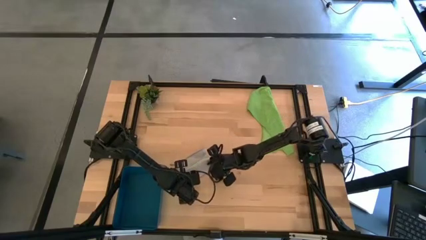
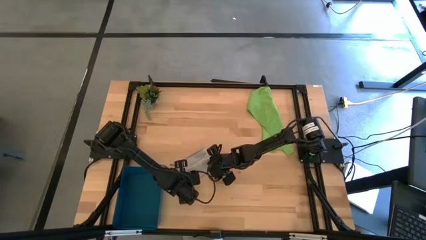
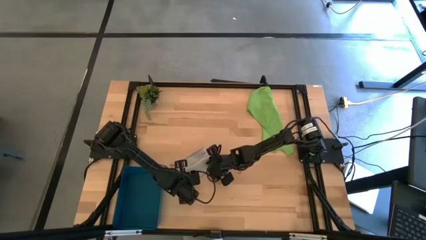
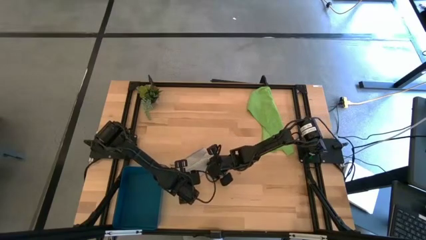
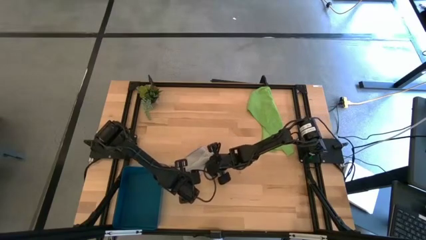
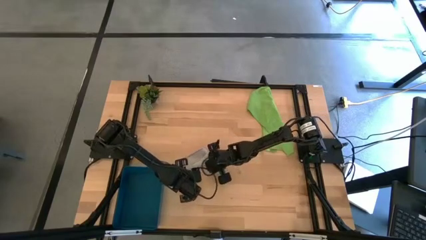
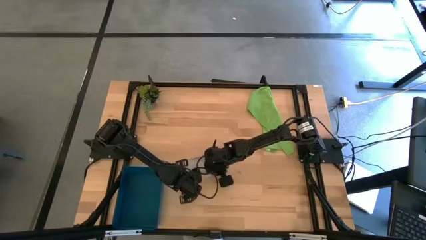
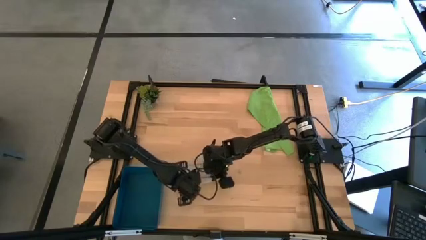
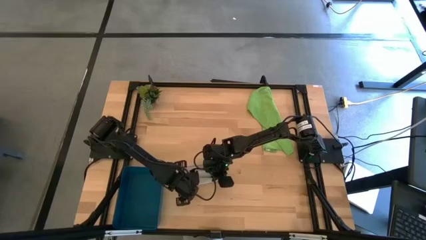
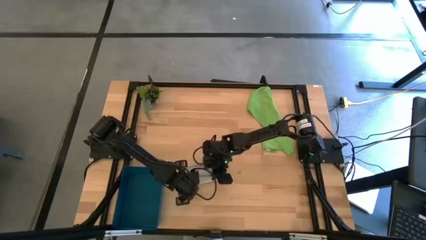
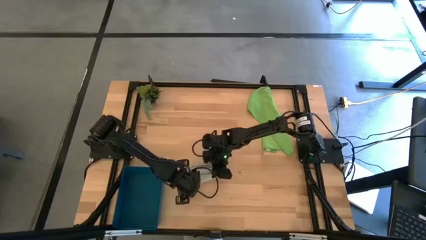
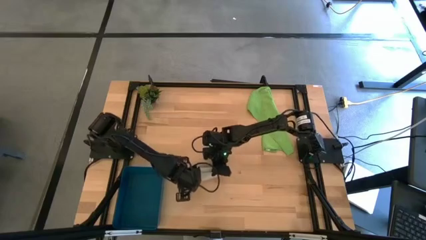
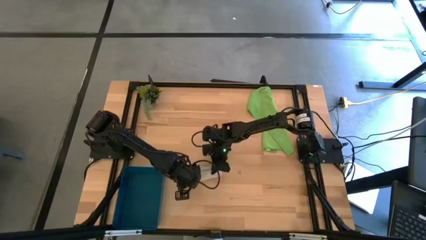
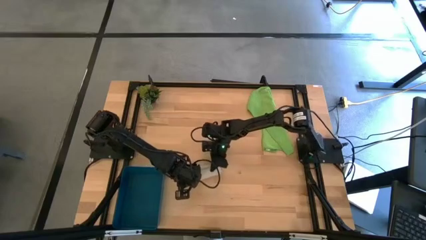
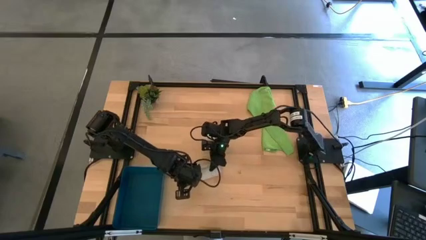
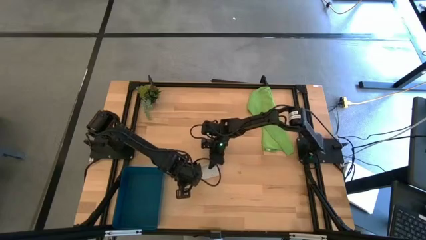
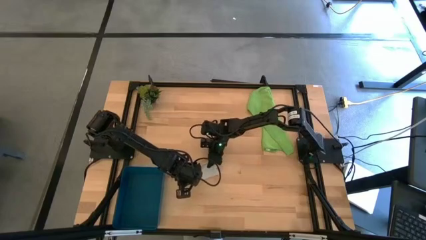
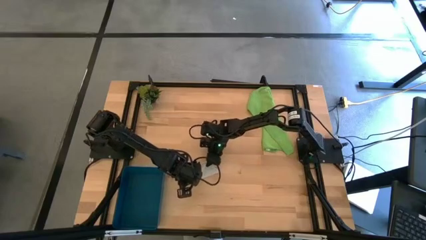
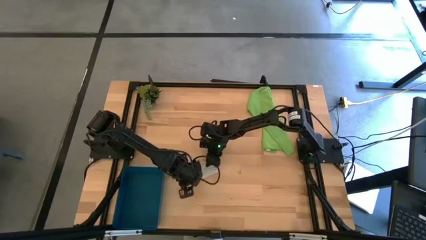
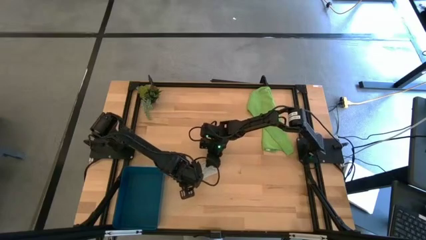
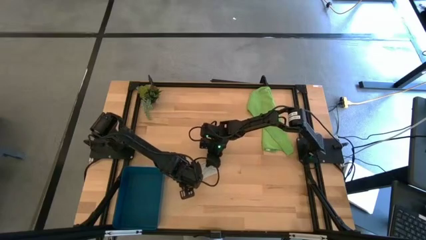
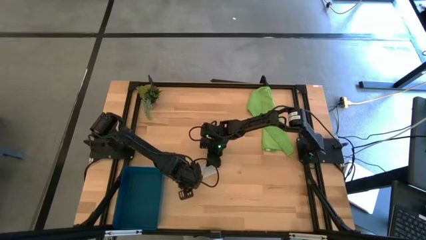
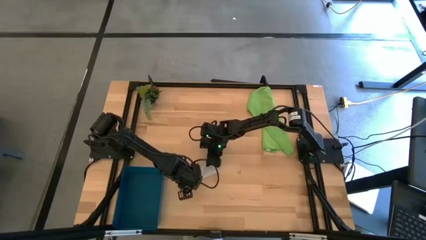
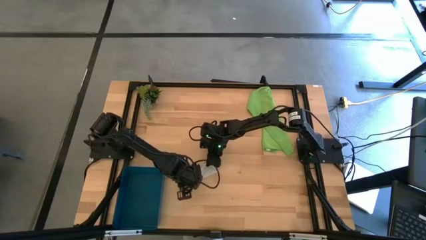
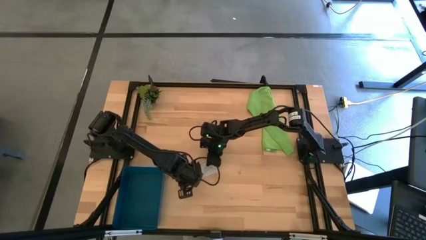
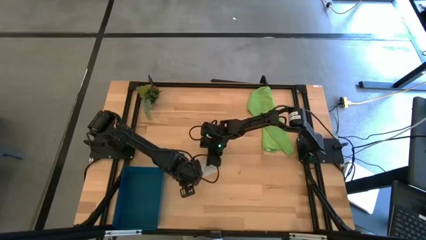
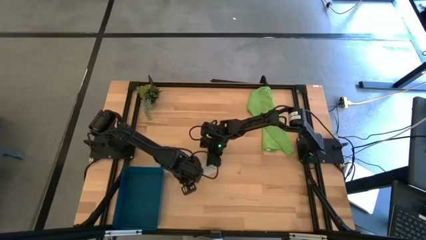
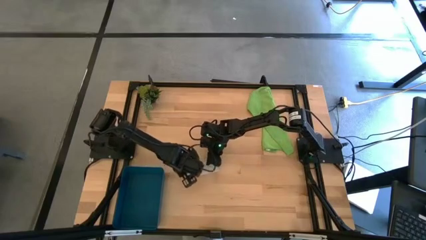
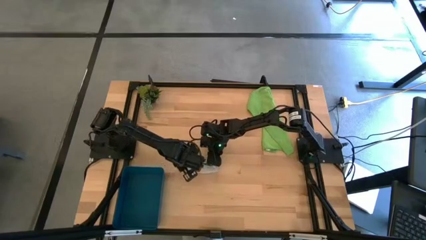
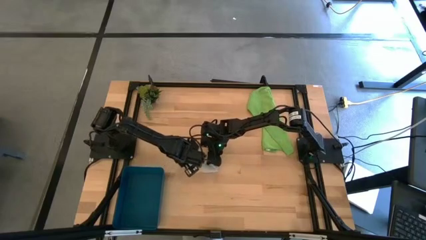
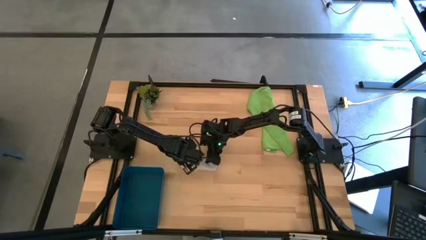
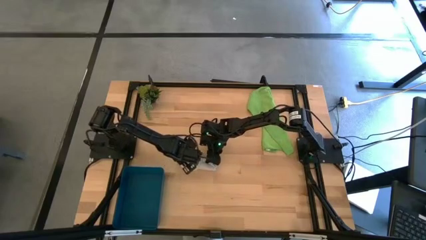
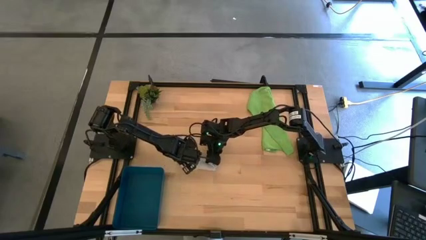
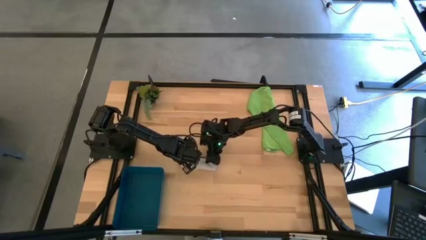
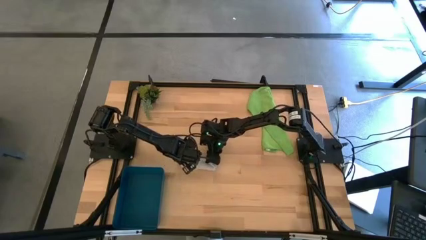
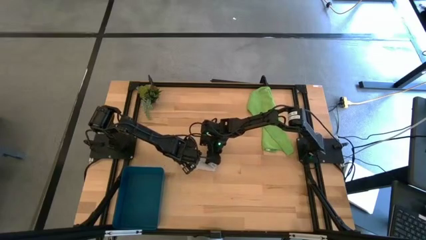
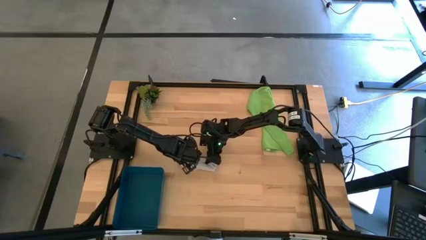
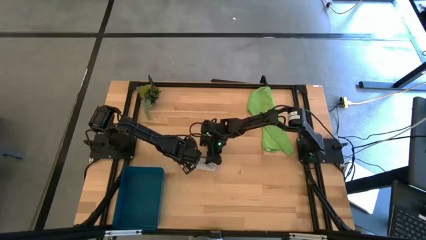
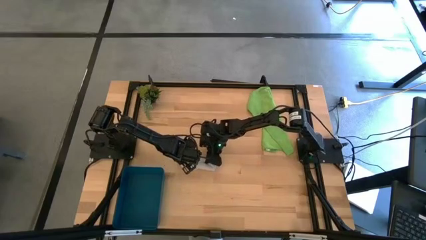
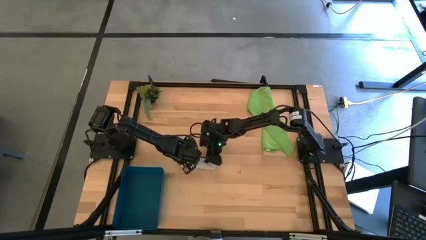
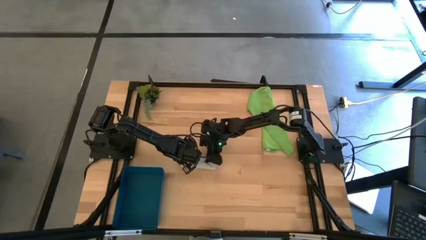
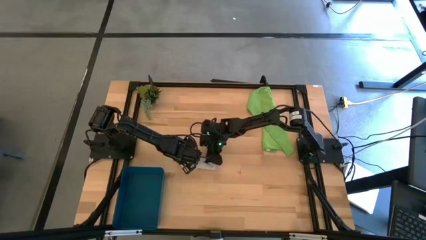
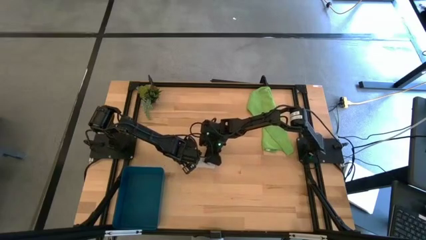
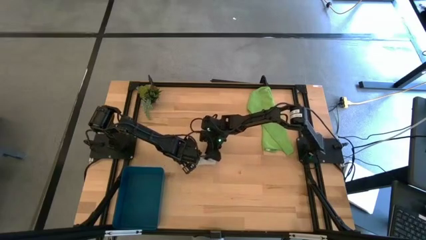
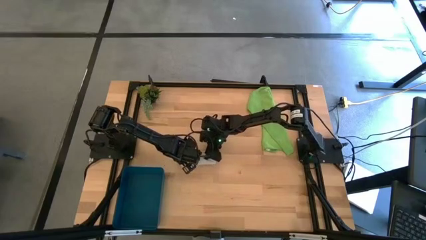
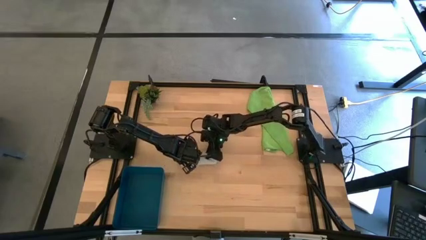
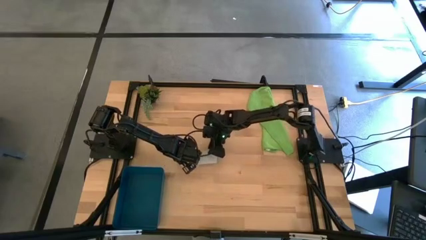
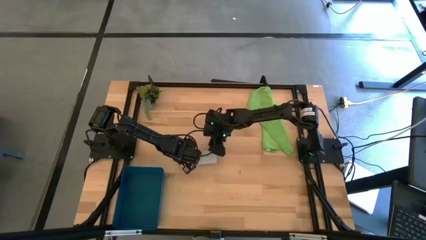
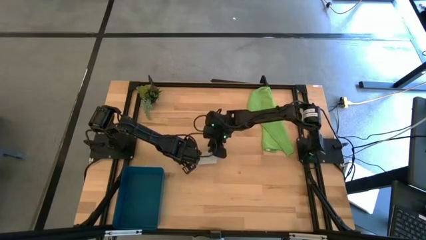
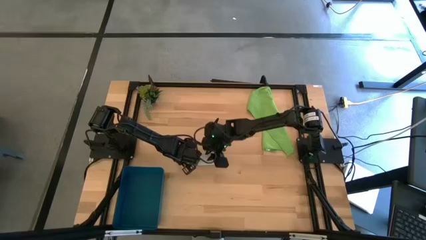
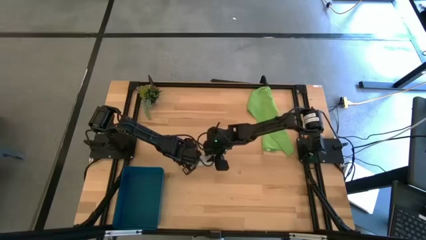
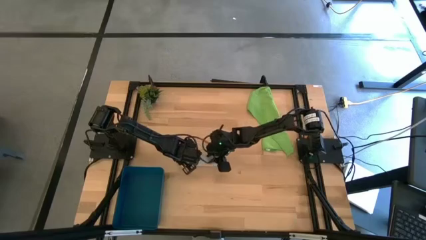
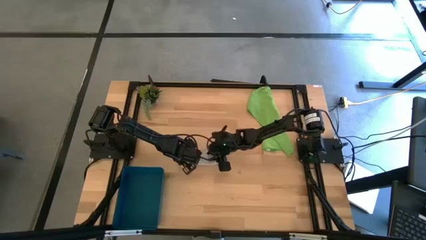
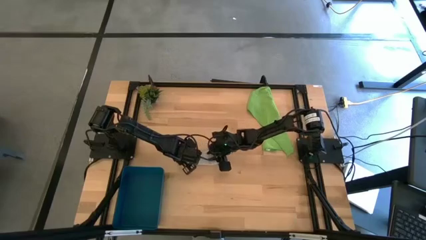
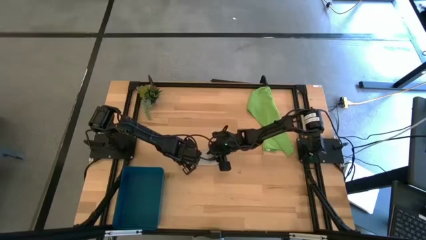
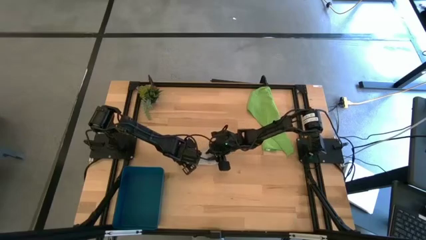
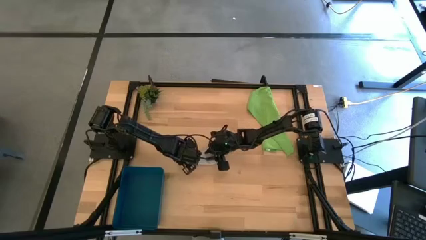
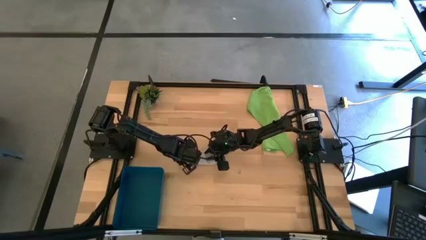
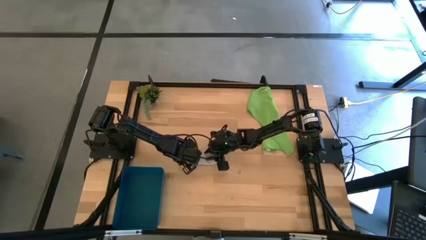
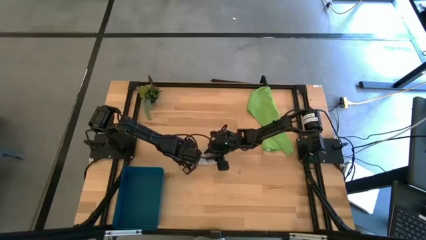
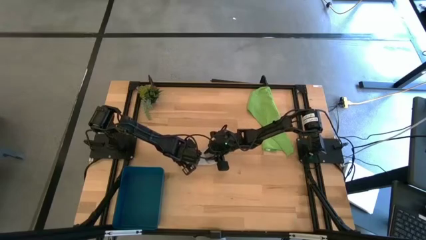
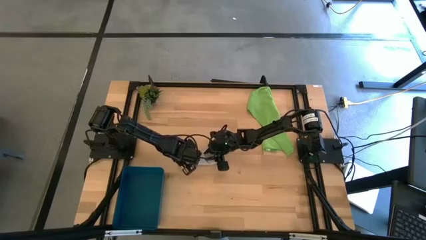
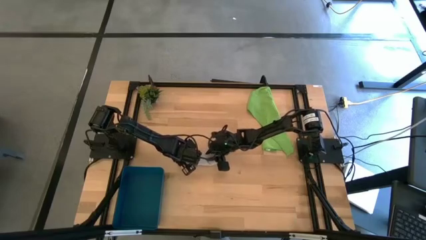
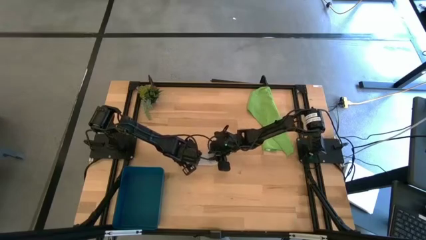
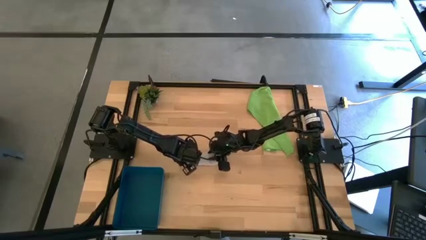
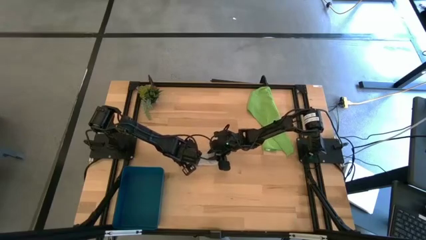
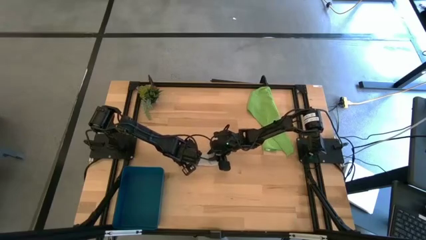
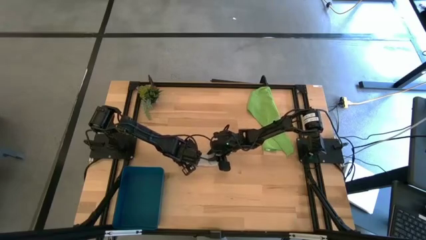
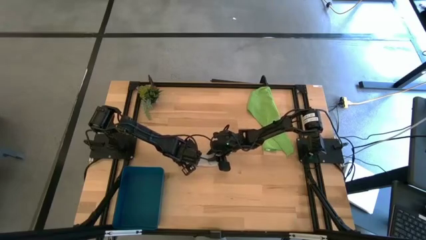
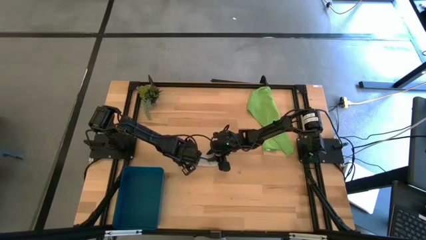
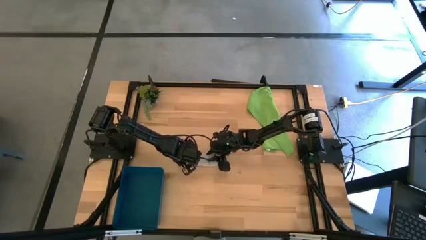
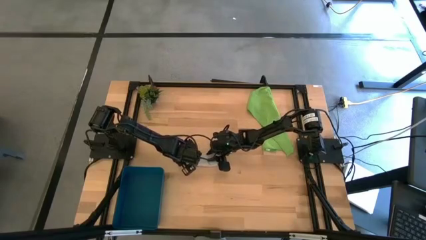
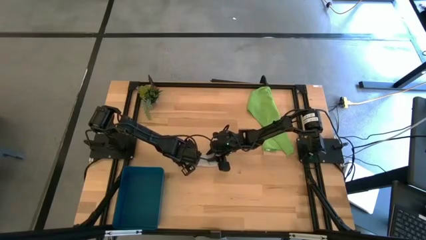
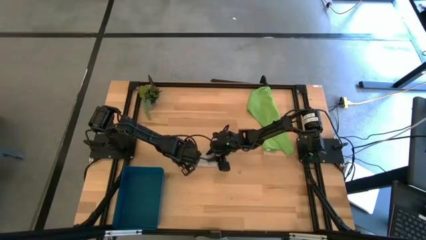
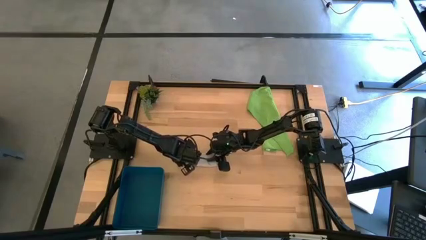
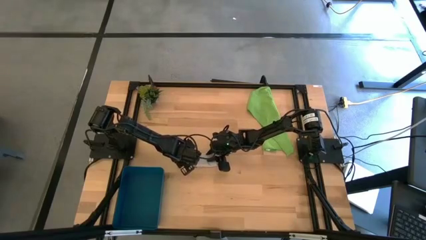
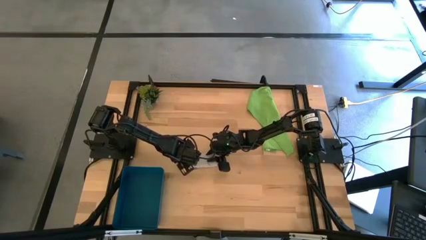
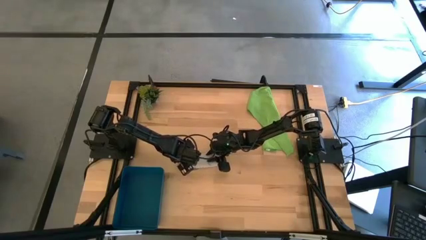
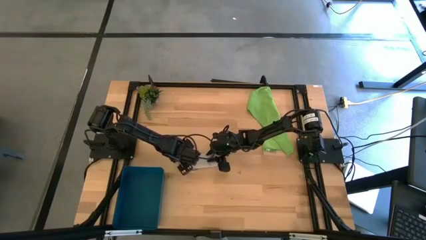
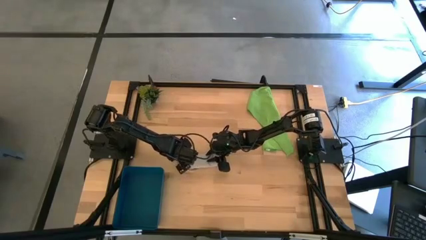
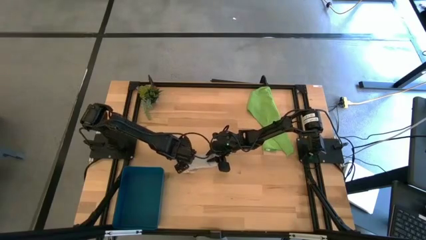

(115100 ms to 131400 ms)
Task: Roll microfiber towels into tight, uniform cylinder then place into a basket
Roll the gray towel
